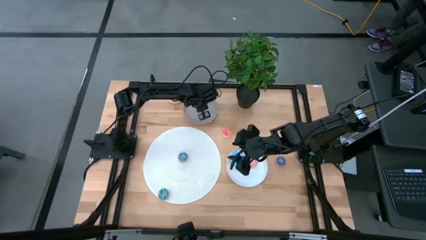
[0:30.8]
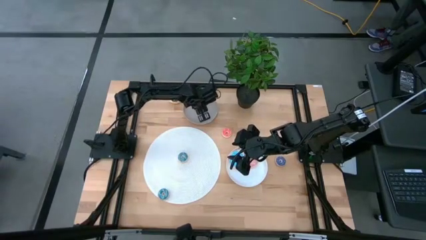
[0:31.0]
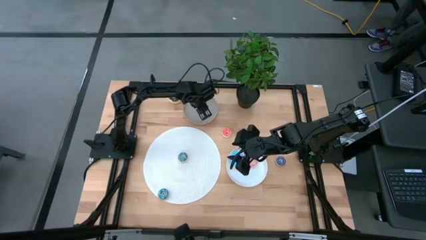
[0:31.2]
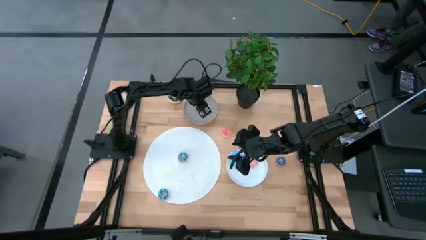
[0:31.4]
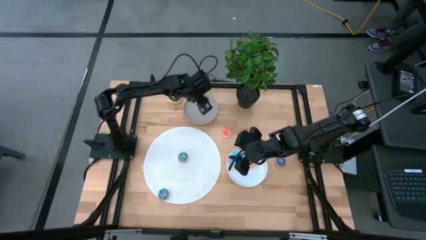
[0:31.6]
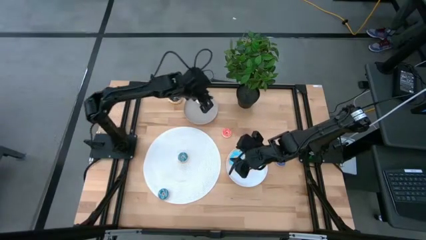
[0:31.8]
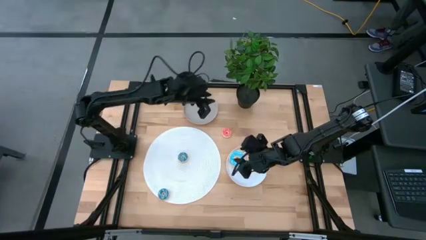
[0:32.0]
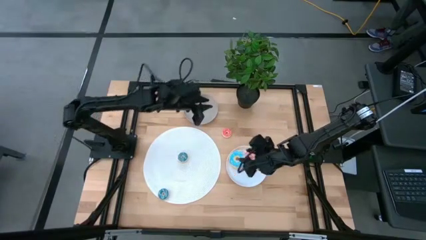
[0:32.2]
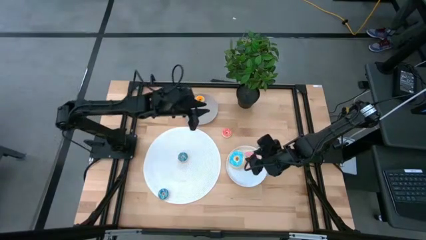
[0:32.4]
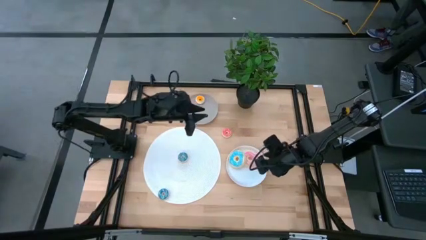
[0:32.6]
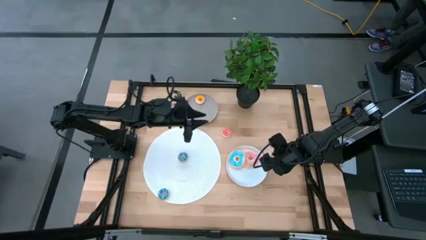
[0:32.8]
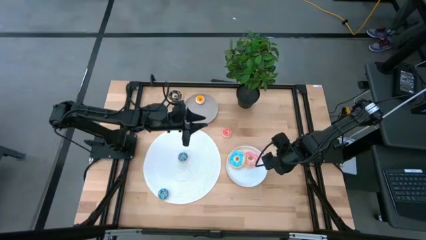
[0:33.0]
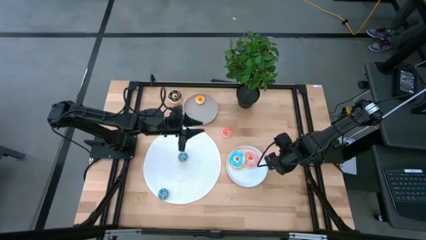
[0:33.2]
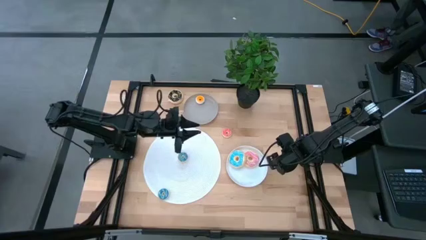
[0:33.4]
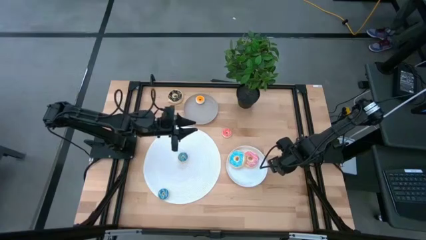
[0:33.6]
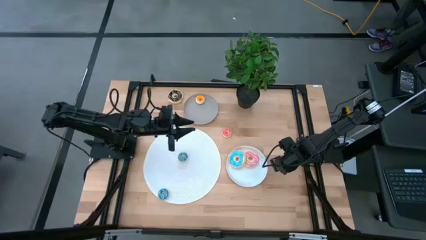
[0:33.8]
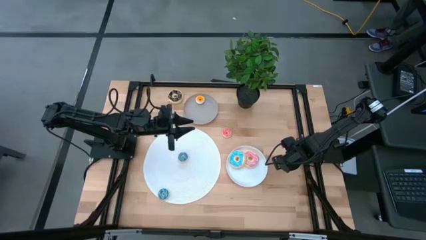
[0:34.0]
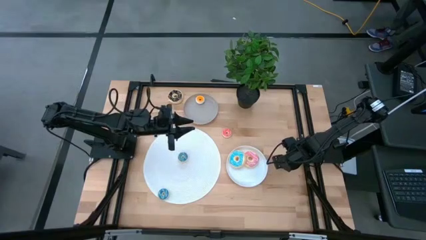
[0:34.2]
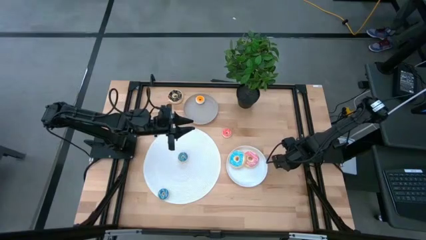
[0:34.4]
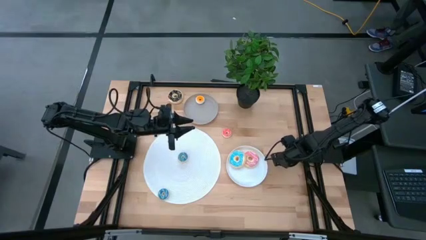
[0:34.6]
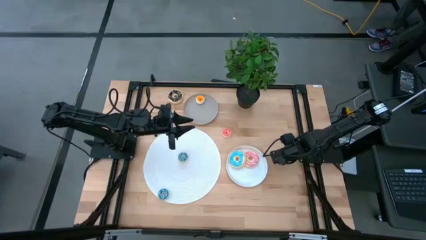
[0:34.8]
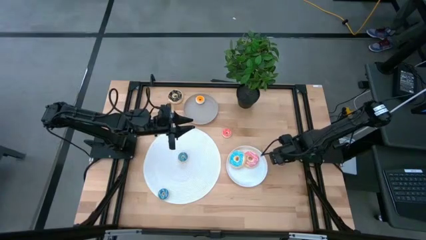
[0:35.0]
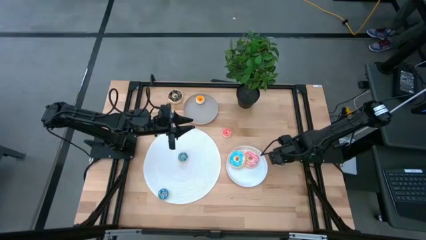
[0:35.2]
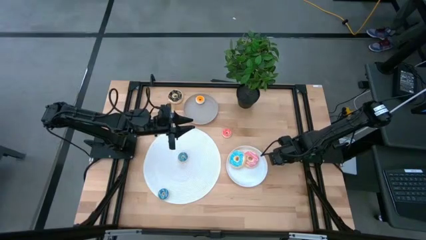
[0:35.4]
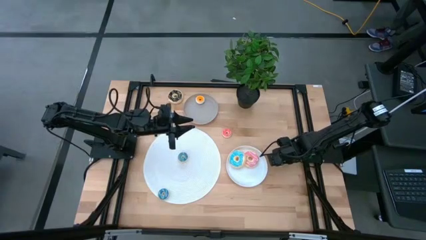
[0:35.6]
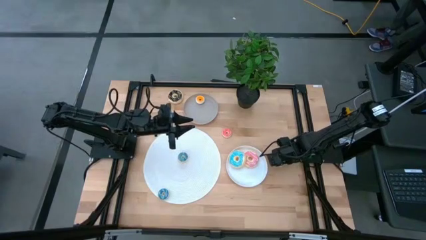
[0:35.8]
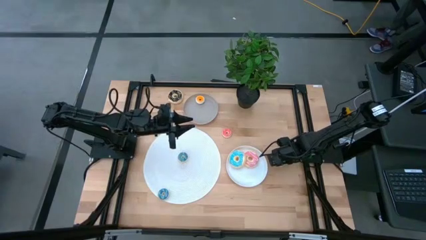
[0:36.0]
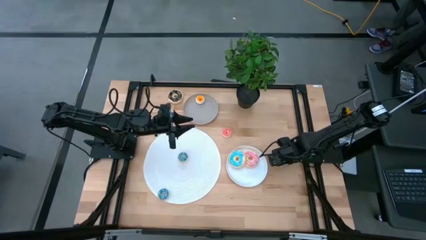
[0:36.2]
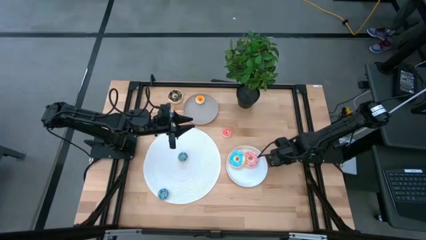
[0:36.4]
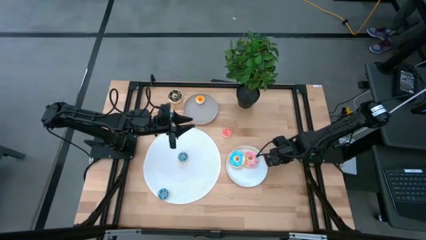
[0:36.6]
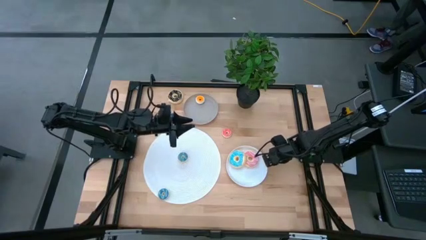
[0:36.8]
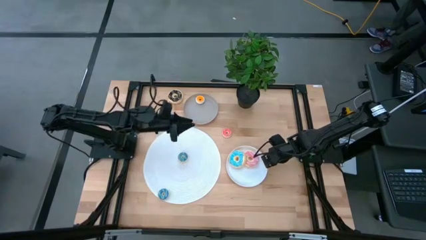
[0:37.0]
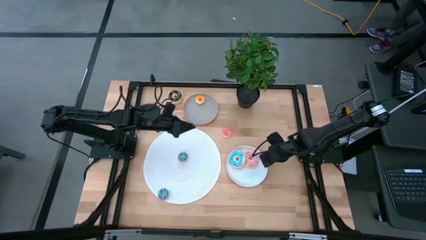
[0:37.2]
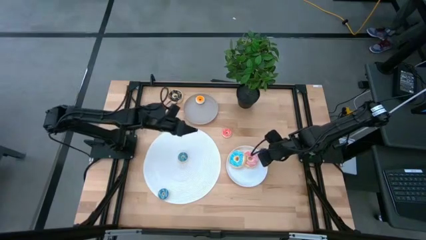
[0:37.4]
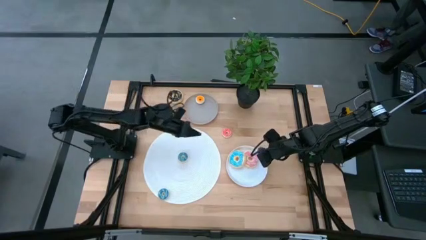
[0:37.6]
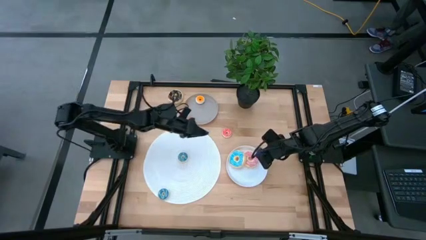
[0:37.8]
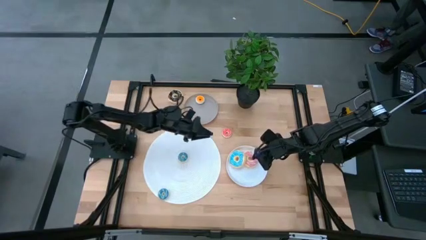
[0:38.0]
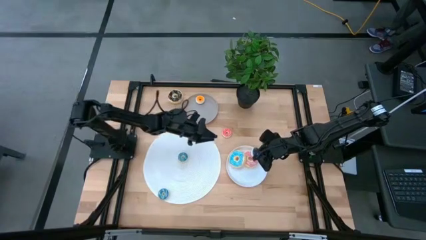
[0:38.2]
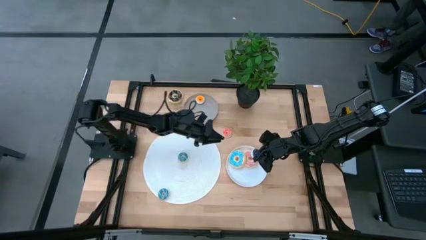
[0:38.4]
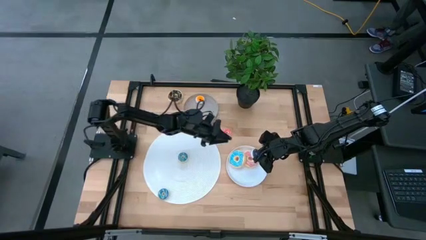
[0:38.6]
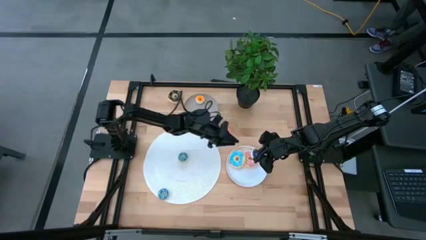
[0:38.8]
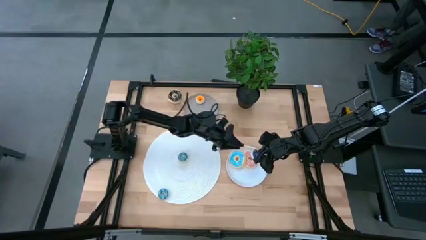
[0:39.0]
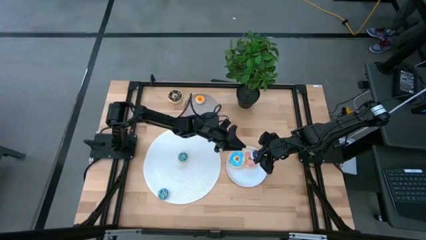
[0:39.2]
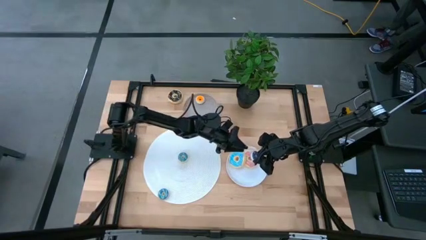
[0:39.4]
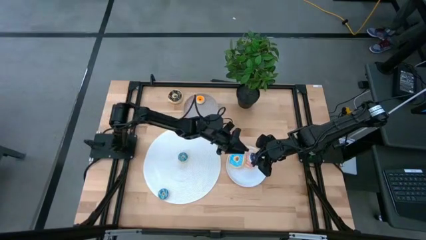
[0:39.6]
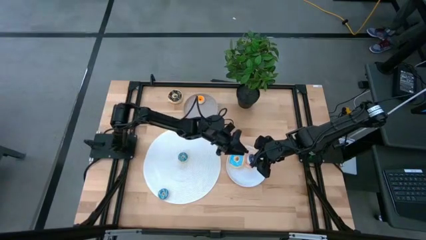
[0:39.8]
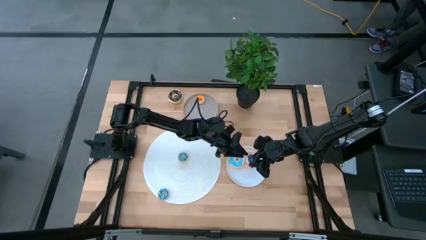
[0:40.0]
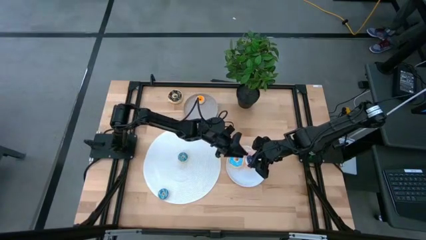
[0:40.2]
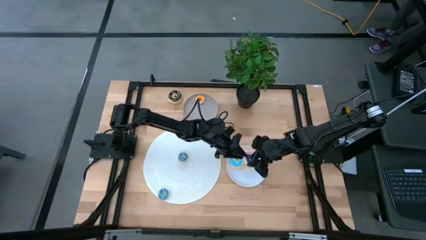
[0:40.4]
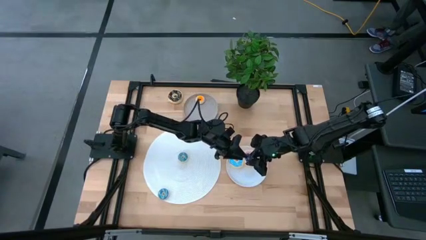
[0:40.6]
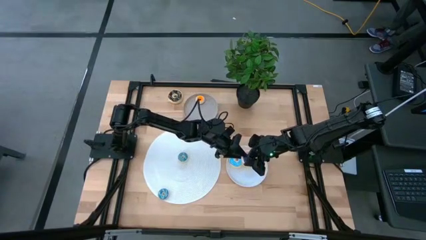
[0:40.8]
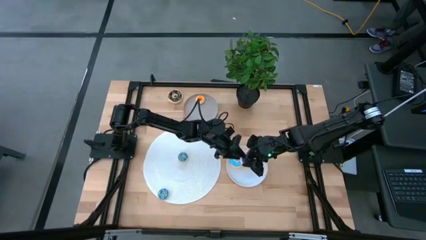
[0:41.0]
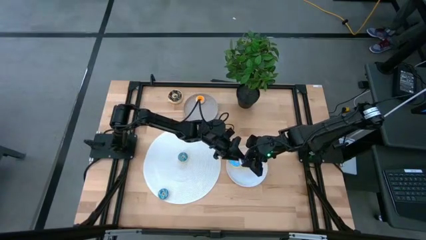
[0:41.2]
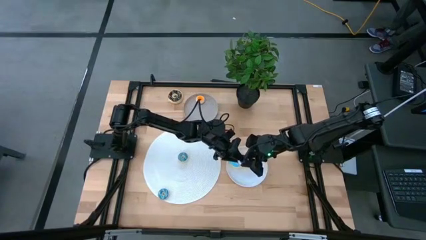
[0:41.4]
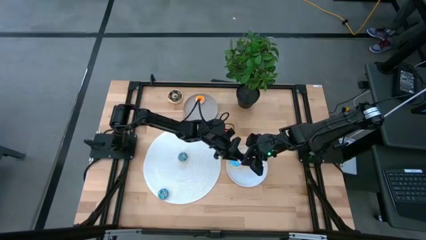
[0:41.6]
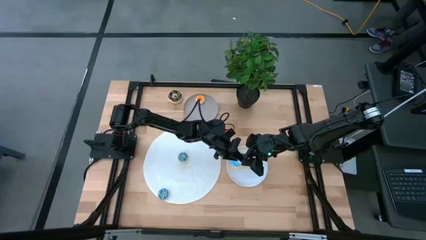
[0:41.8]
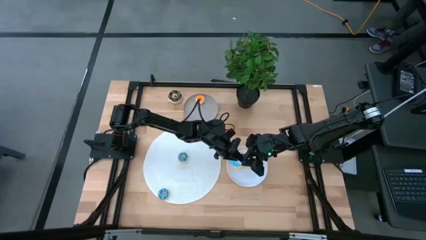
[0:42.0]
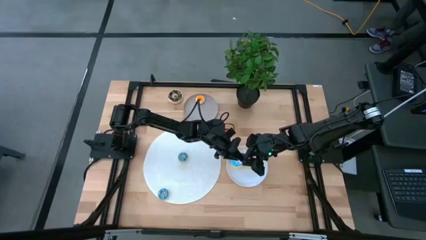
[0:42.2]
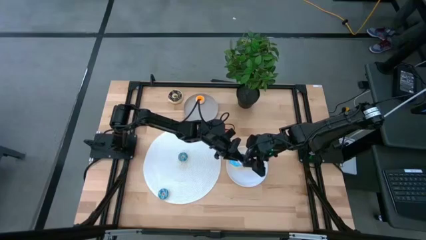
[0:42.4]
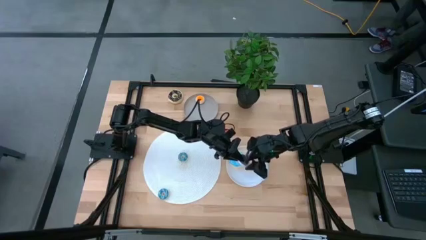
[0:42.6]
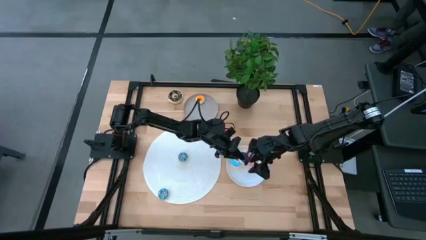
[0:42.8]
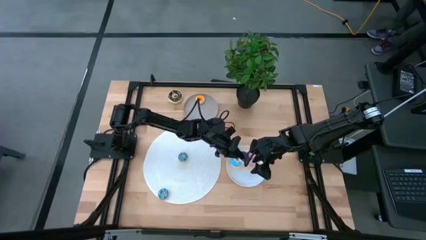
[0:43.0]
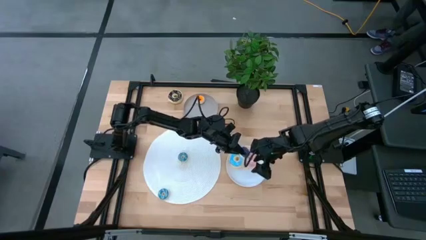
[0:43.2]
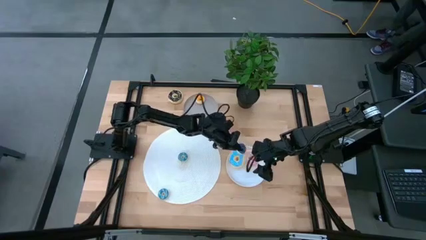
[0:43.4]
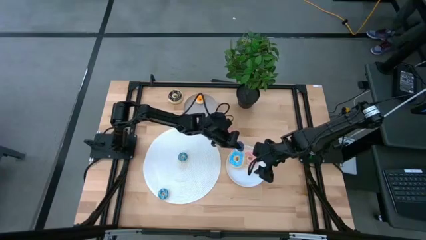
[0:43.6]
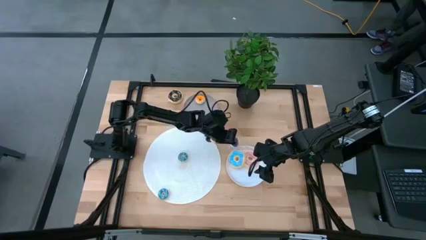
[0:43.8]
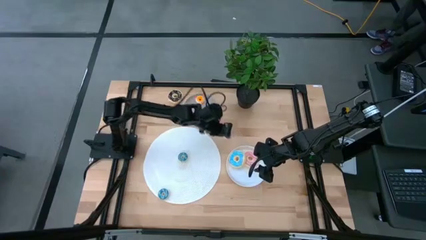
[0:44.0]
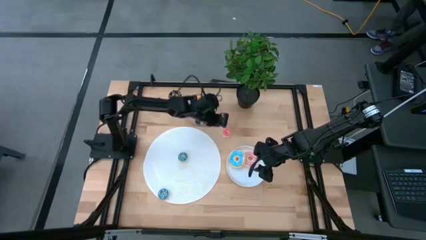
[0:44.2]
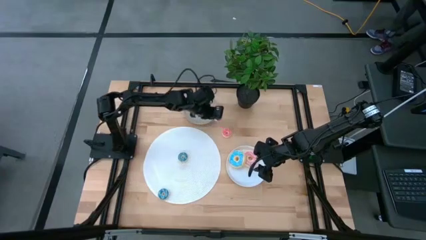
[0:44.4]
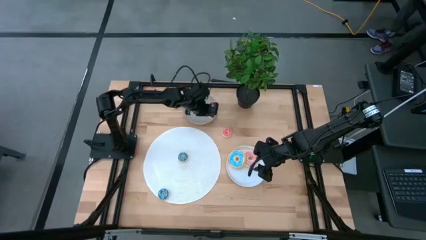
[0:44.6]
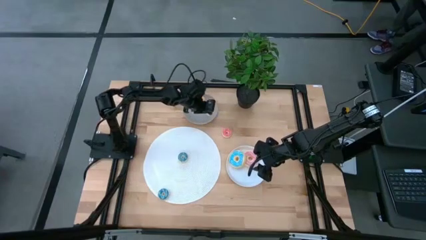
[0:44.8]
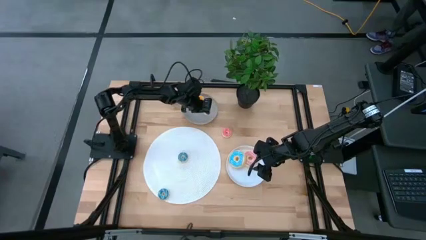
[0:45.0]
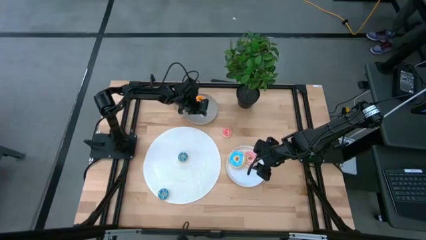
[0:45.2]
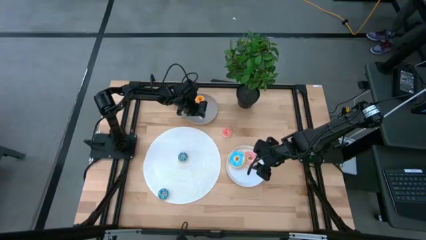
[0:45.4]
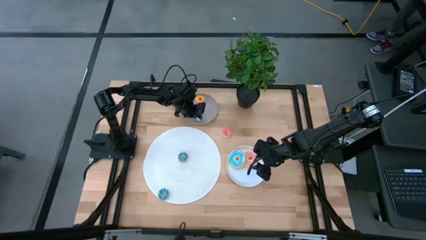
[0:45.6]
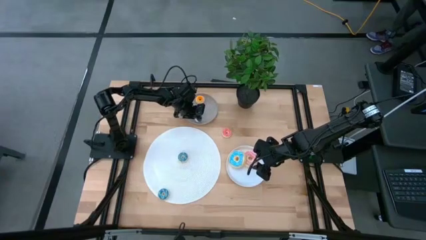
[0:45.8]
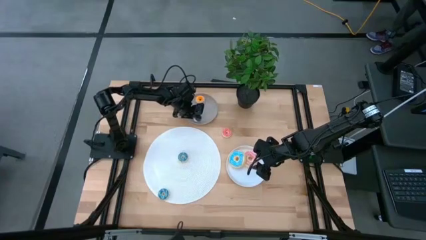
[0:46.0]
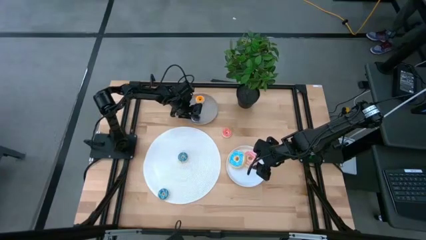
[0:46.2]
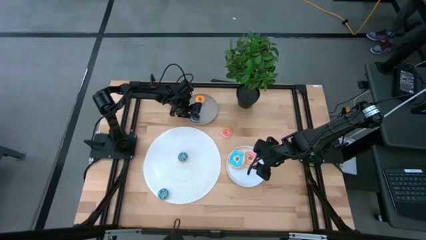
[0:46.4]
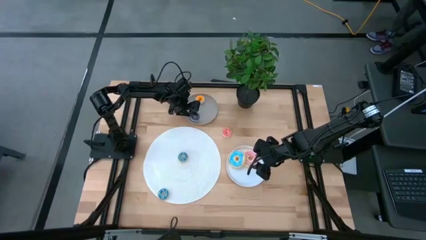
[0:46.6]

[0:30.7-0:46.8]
Task: Pick & Place donuts
Put the small purple donut on the brown plate
